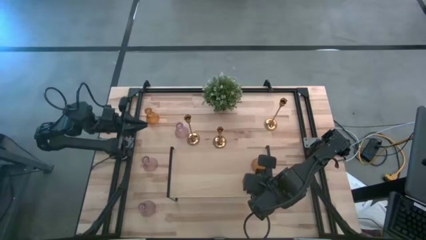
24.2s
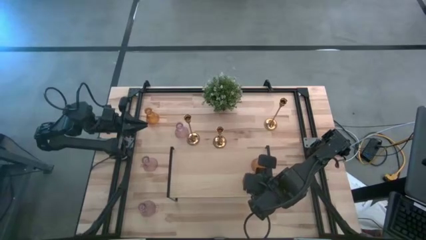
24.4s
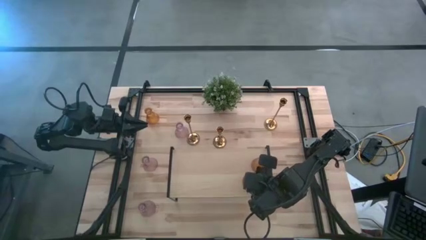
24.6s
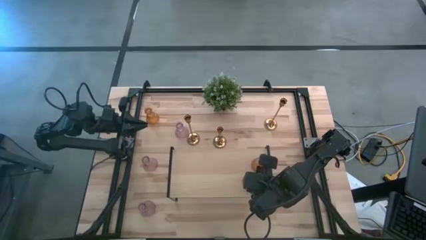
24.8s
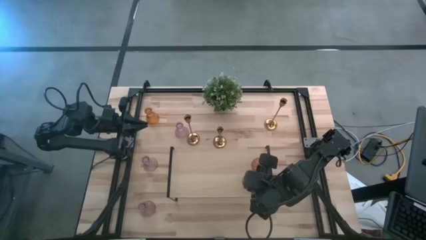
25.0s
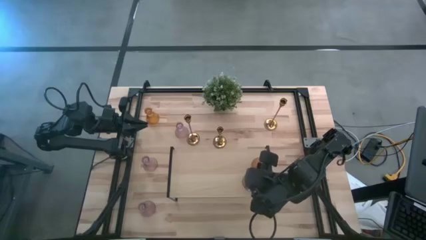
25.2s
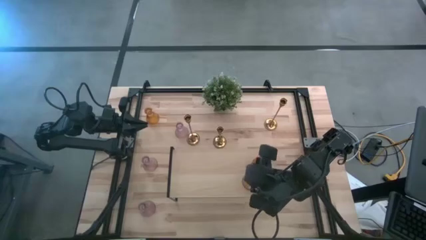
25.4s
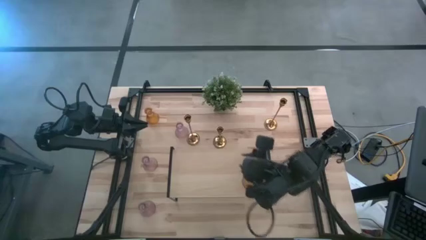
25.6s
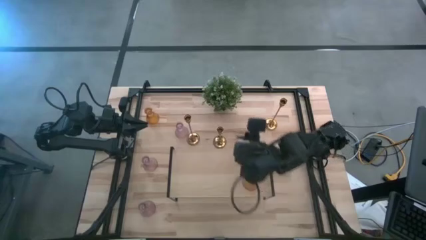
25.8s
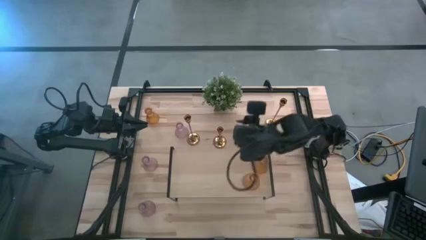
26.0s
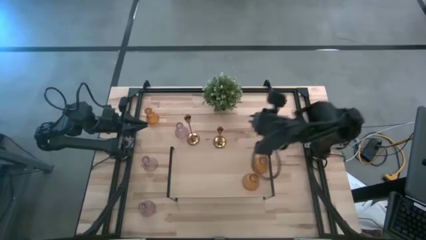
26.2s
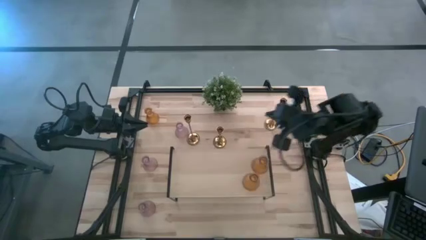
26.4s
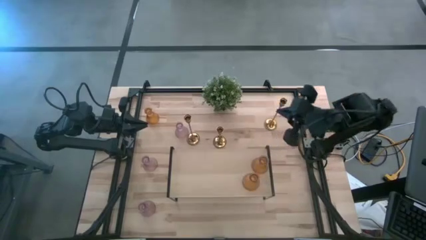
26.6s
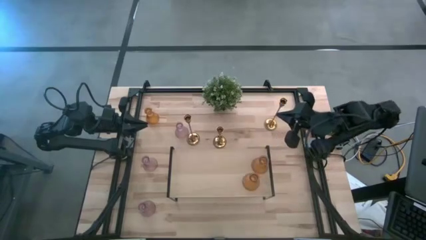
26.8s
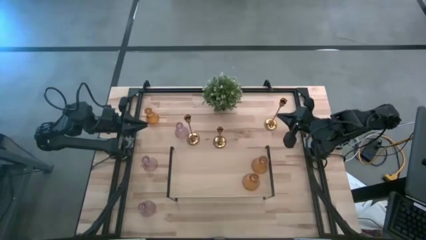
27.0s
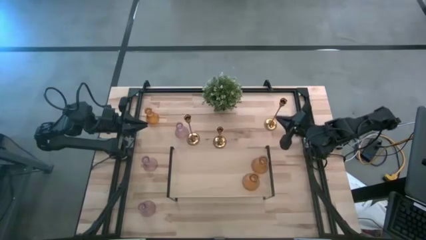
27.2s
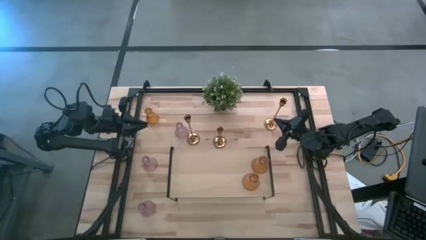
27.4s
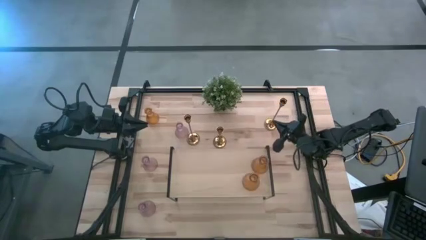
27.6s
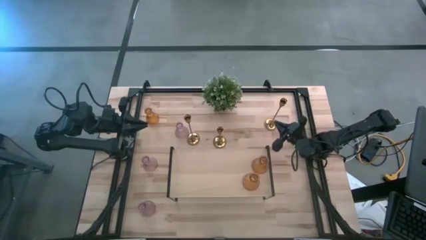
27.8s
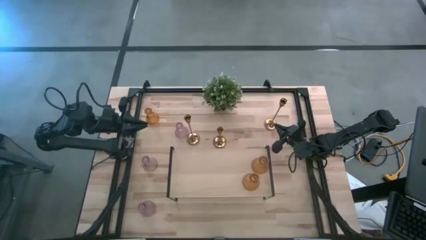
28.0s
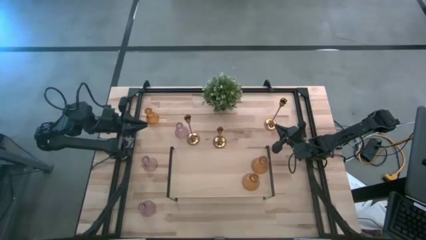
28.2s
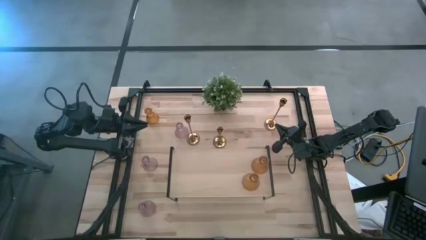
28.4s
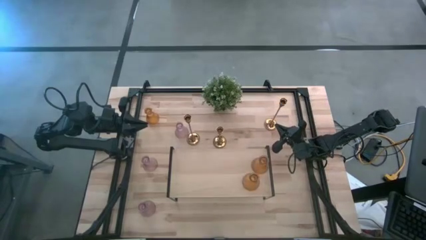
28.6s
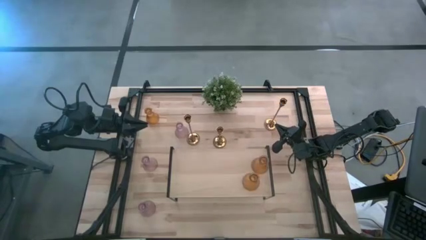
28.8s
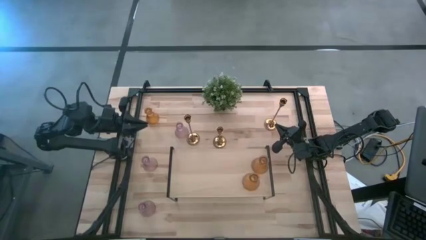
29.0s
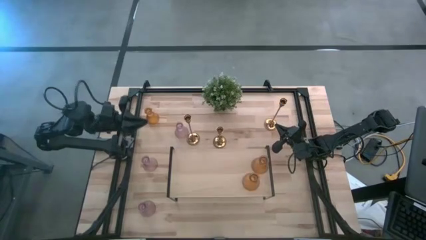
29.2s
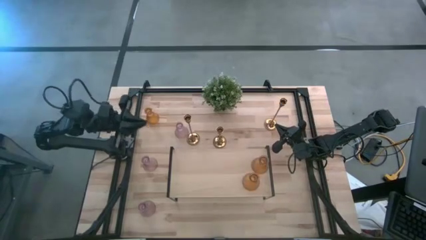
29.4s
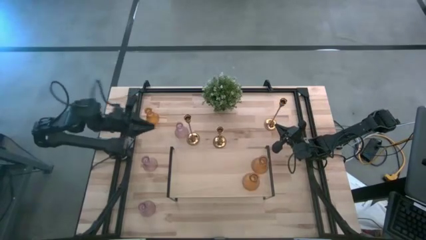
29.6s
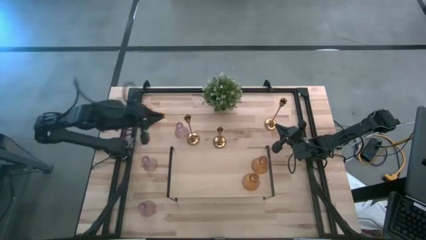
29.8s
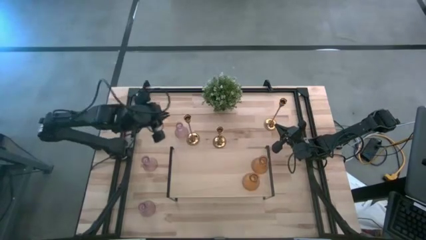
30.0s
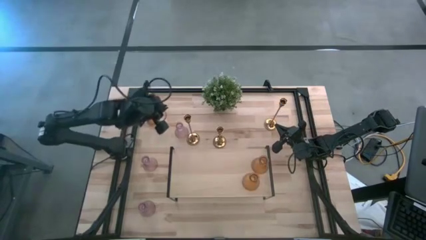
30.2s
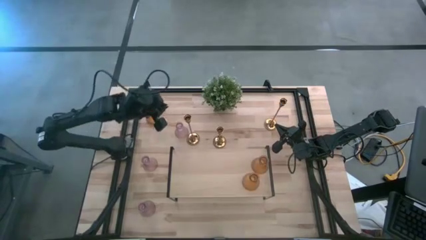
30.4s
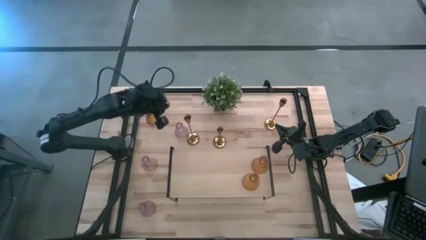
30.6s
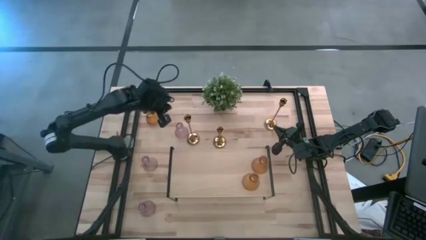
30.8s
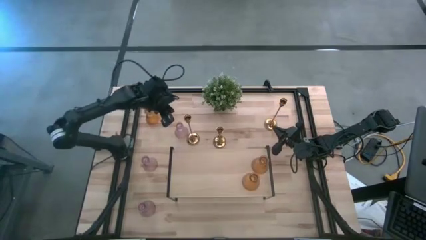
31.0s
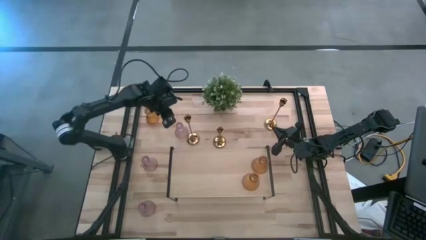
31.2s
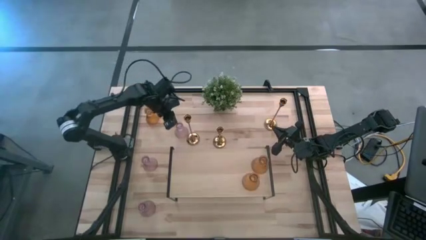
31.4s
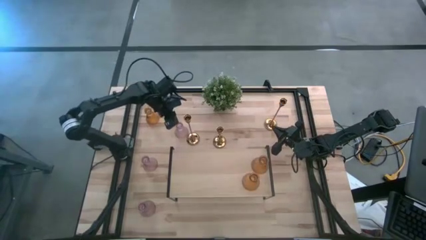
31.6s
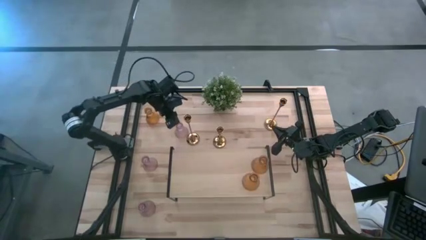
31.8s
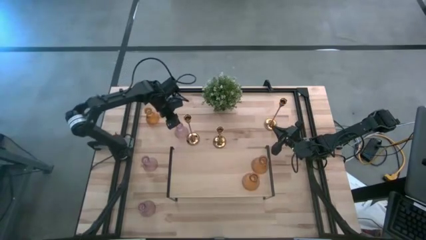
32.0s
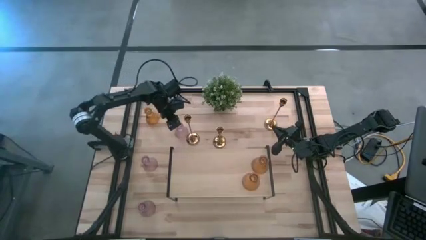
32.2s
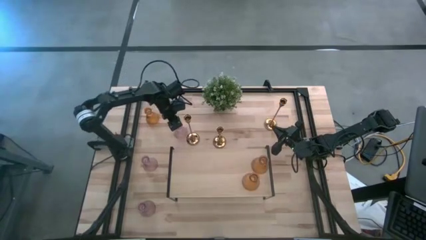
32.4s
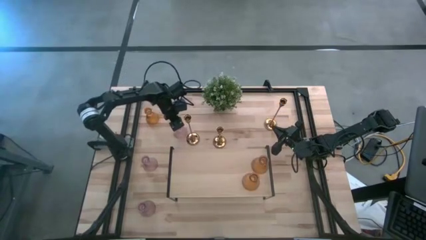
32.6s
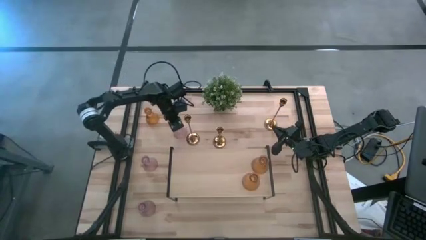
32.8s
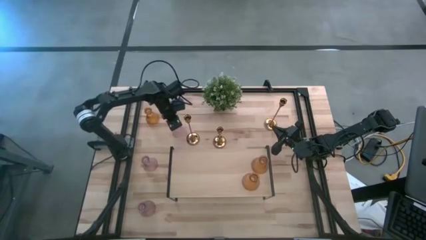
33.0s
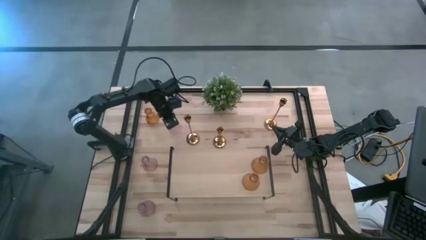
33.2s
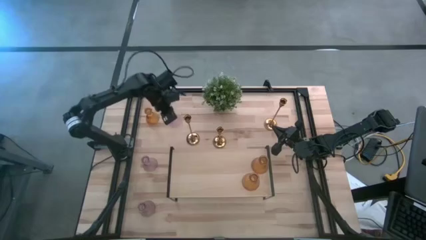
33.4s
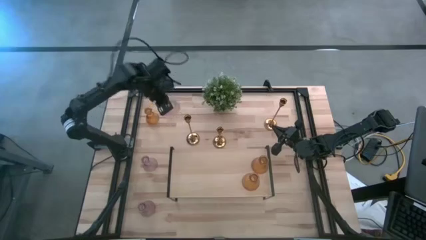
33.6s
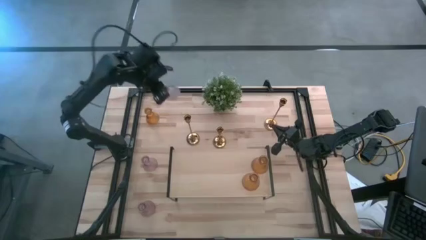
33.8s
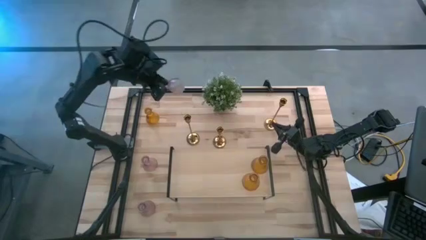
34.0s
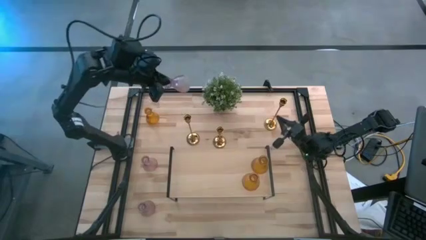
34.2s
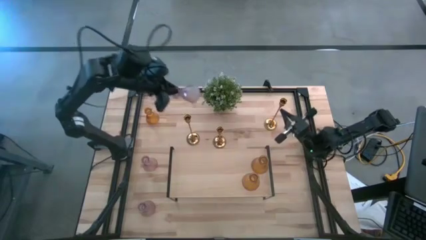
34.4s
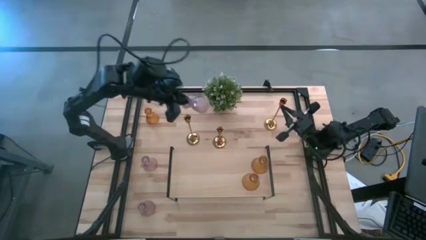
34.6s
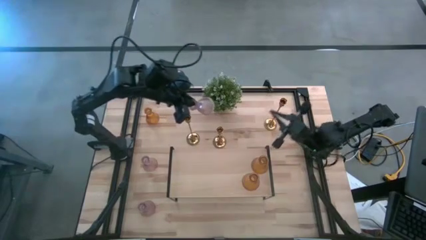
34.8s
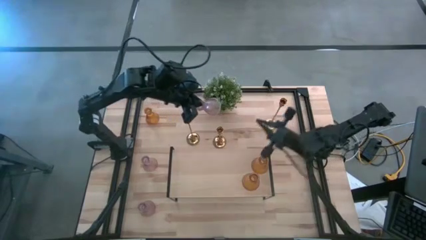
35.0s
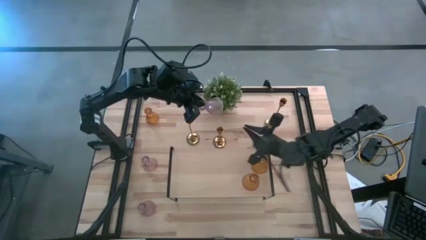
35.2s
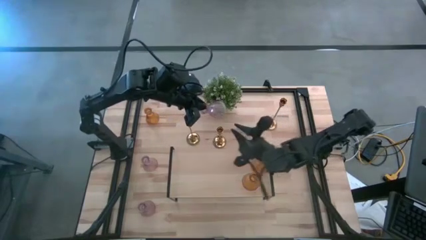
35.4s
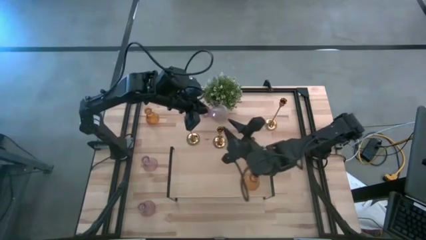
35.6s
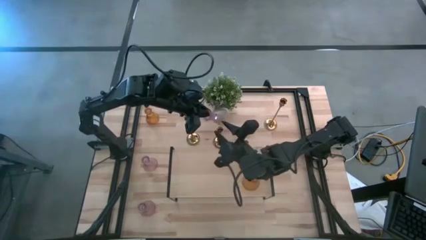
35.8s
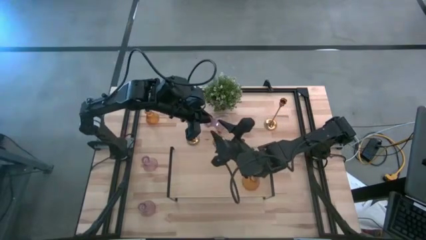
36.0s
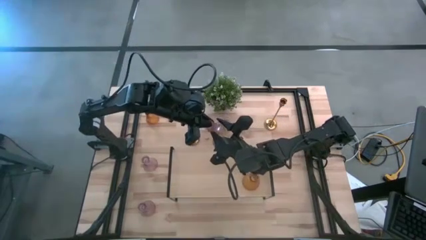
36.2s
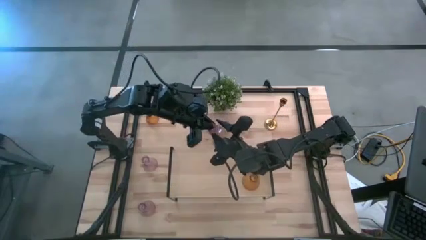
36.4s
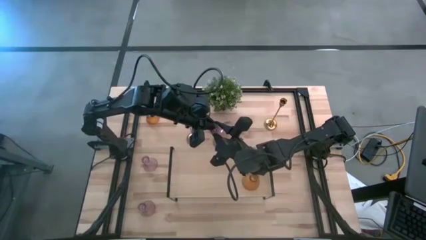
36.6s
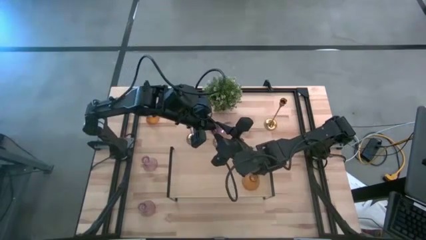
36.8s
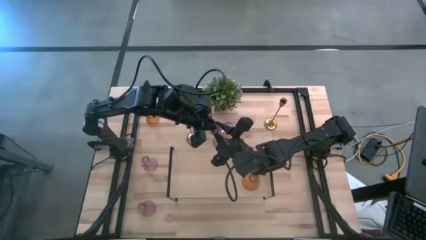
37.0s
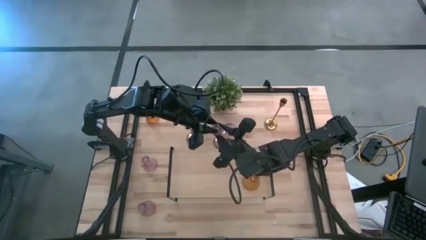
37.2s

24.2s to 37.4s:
Task: Pick & Place candle stick holders
Put the top violet candle holder on the shelf
